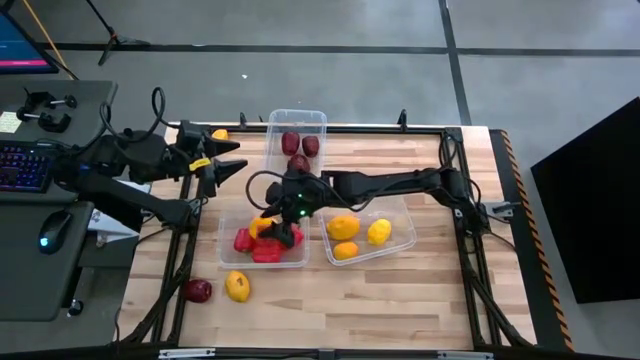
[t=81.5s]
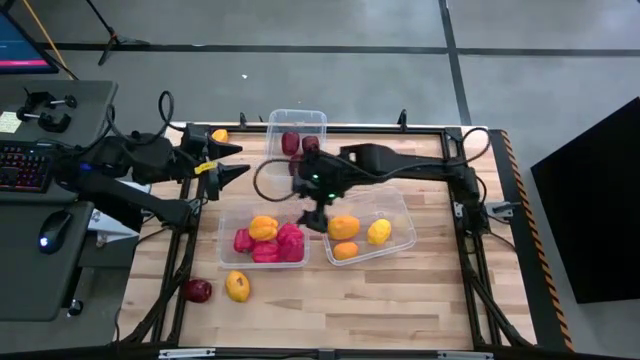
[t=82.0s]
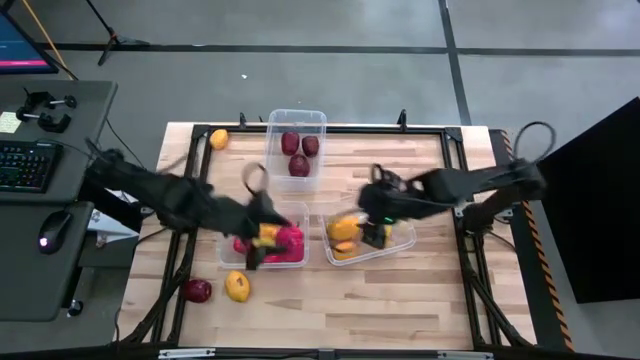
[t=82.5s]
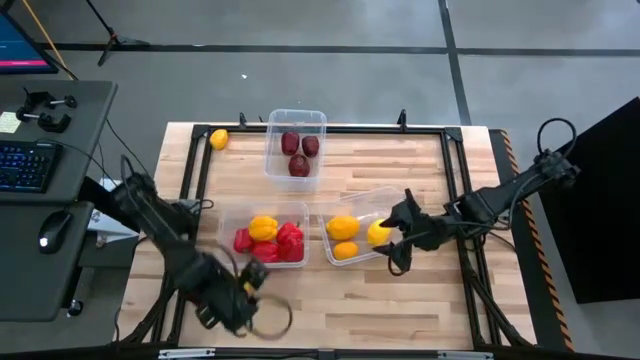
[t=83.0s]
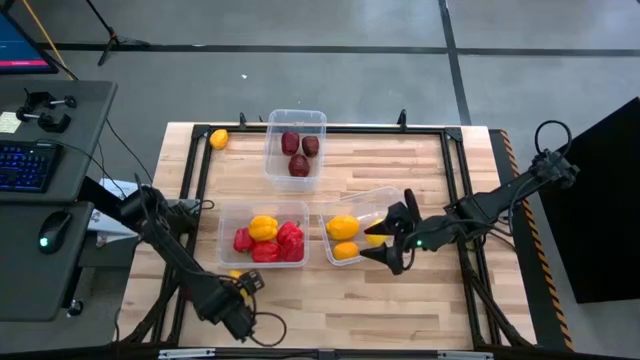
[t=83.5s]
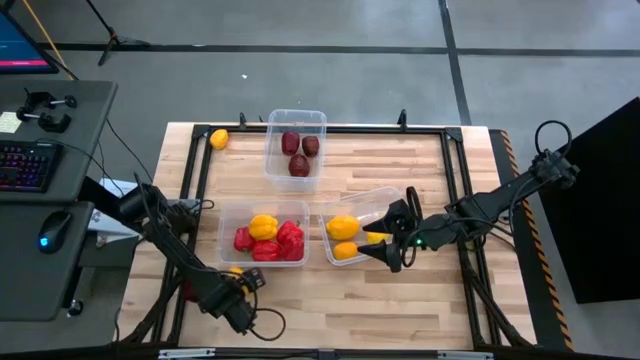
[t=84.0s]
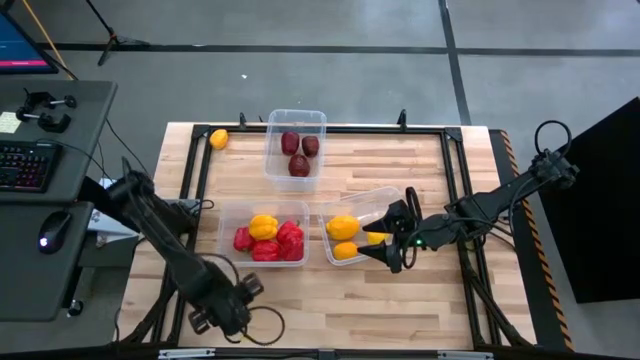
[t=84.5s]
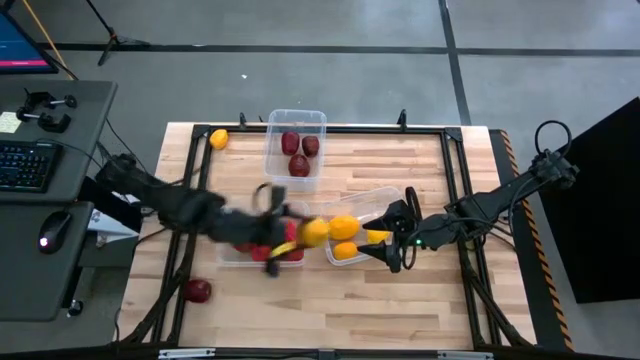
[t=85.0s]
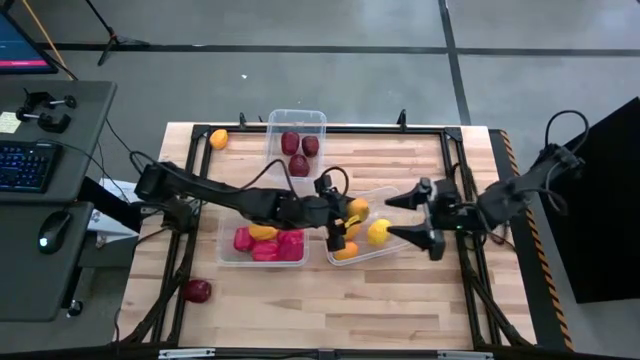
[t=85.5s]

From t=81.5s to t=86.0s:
Task: Sort produce into baskets
Put the bottom lemon into the middle right transparent bin

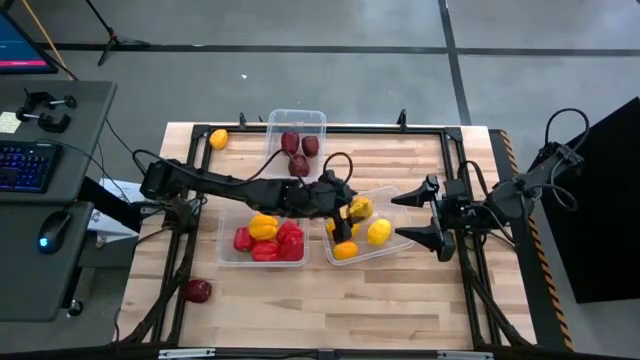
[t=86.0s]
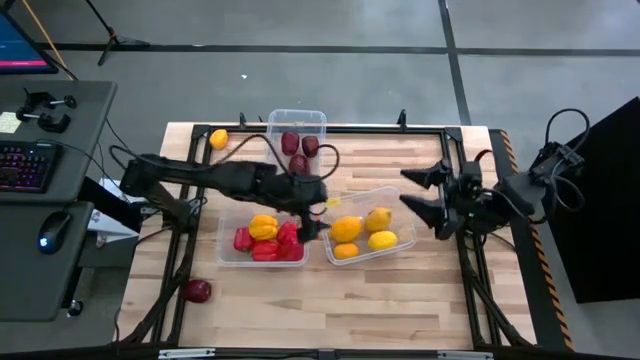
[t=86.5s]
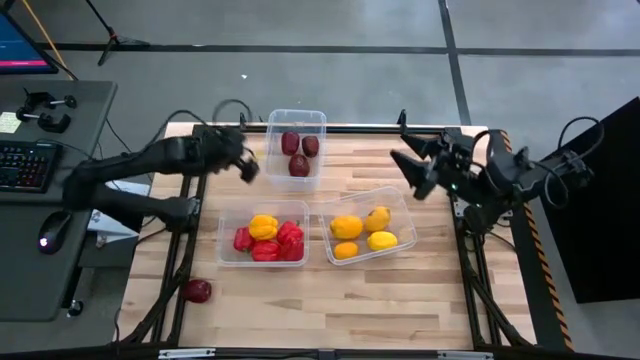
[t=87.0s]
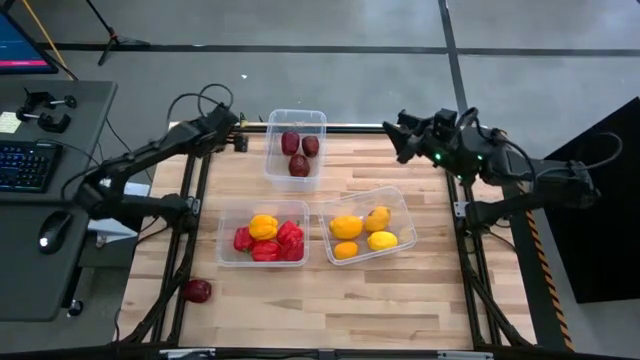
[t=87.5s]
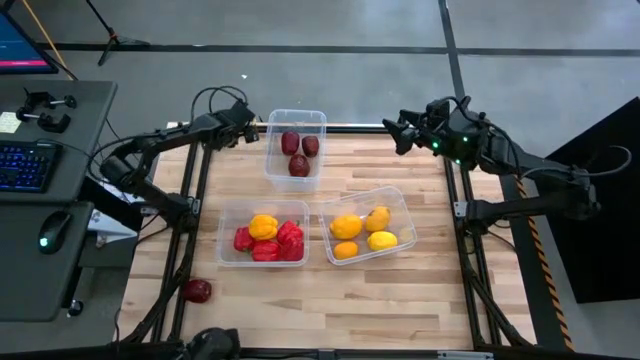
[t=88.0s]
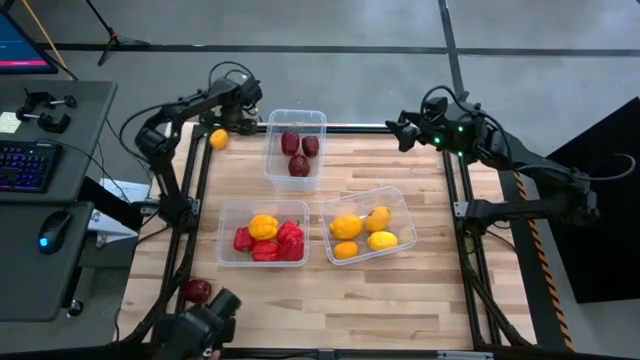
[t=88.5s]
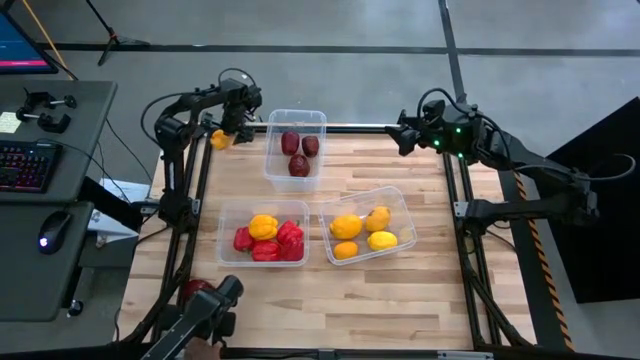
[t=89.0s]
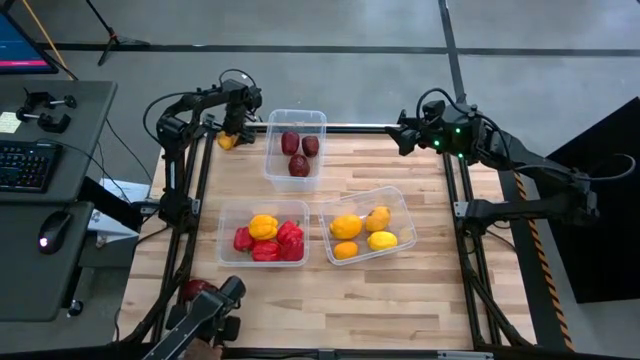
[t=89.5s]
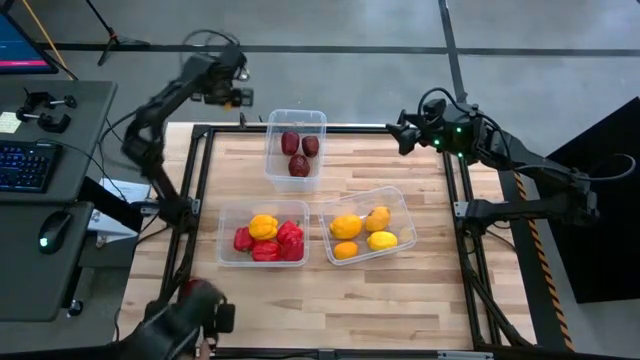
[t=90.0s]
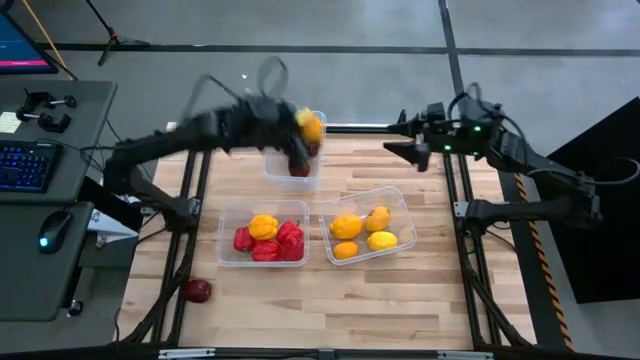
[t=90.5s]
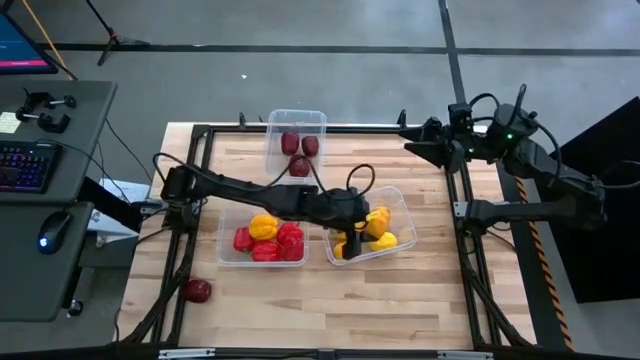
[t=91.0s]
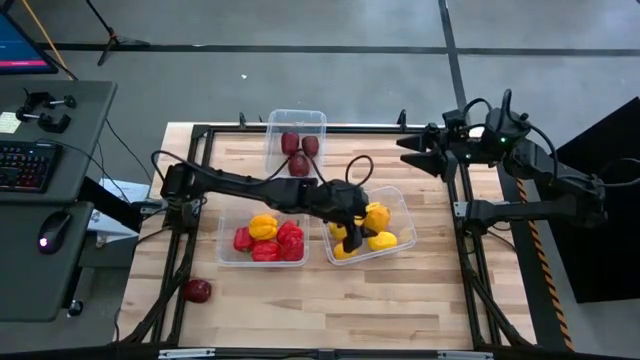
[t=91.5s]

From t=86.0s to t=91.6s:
Put the top left lemon into the middle right transparent bin

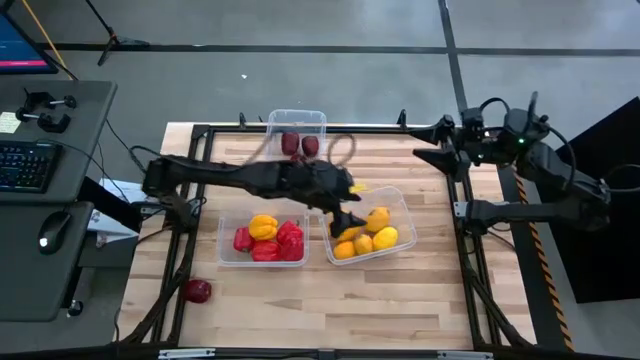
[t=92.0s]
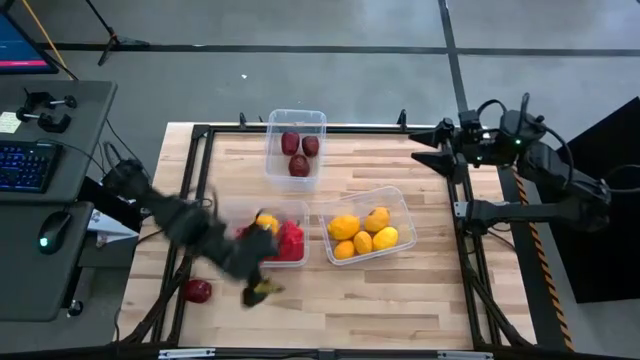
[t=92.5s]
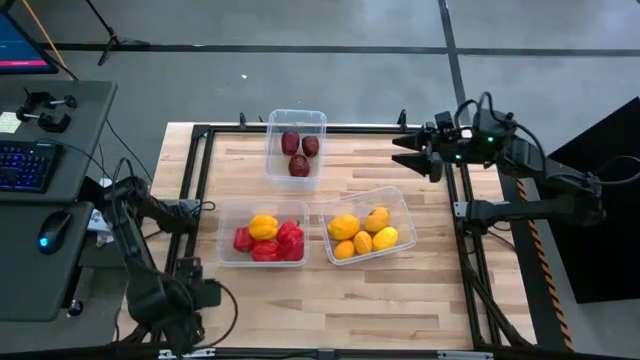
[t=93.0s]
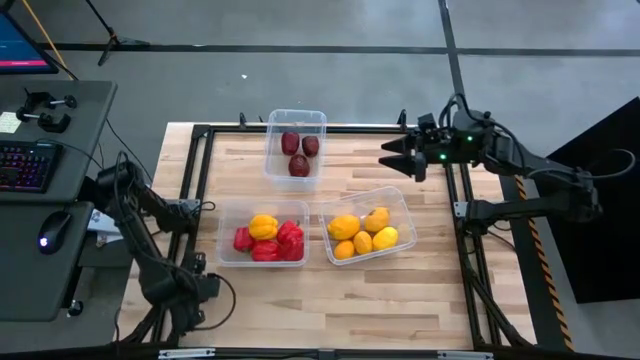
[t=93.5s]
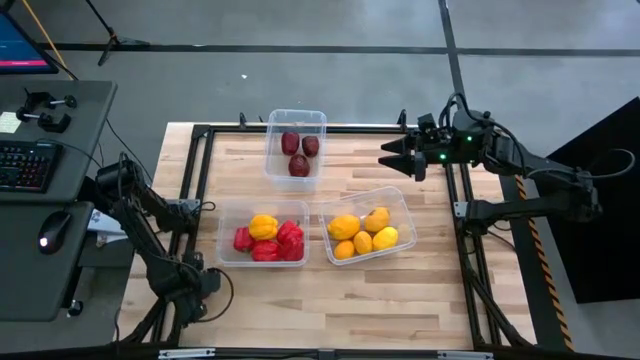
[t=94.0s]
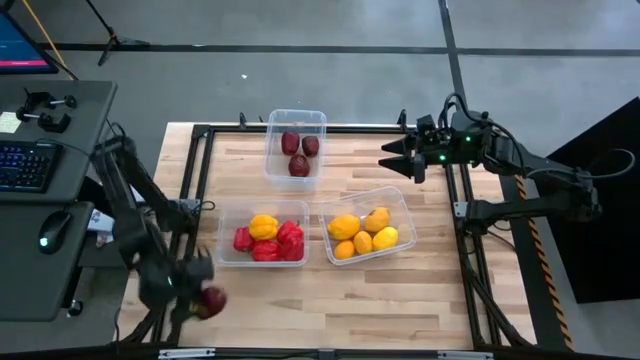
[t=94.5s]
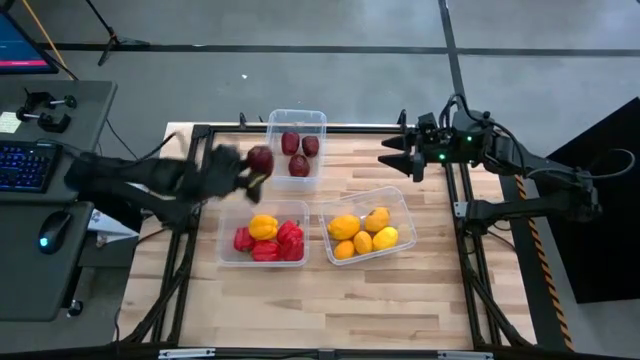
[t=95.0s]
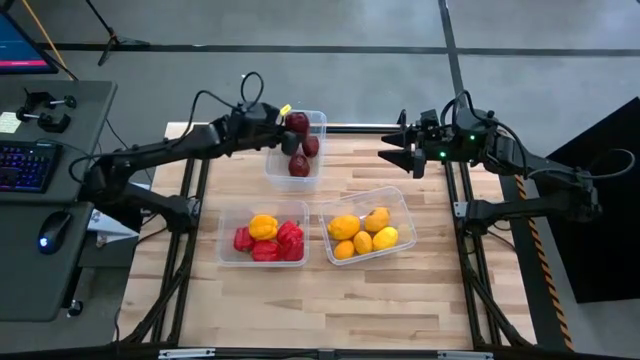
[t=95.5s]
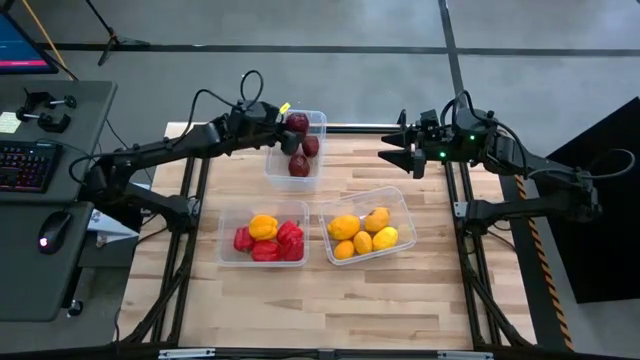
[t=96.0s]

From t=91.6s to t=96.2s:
Put the bottom left red apple into the top center transparent bin

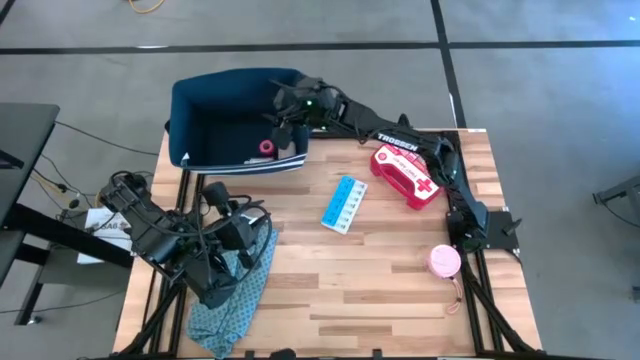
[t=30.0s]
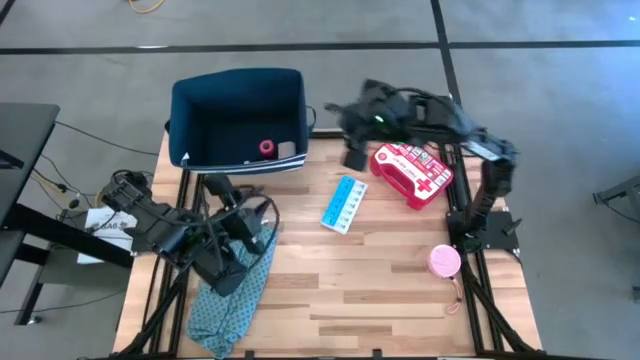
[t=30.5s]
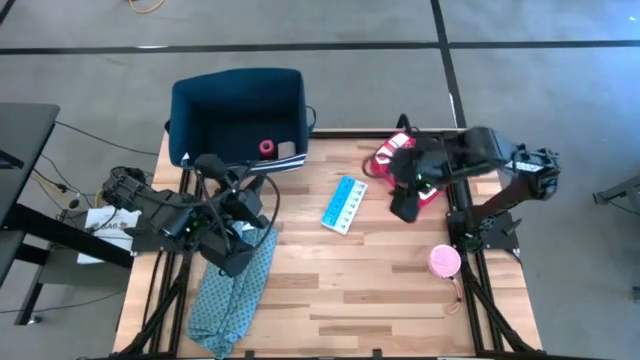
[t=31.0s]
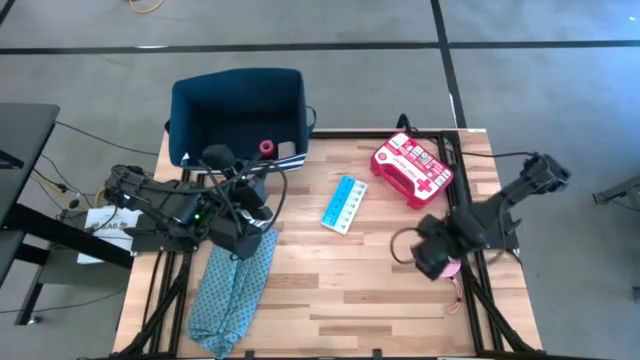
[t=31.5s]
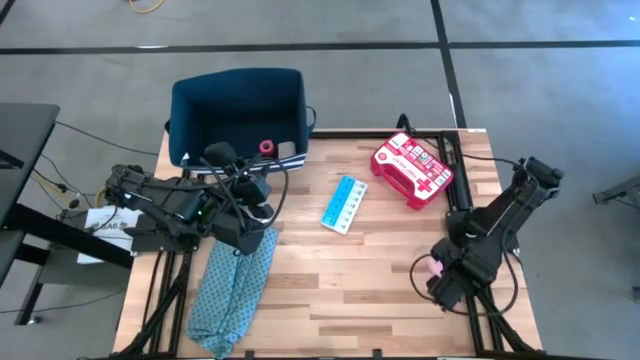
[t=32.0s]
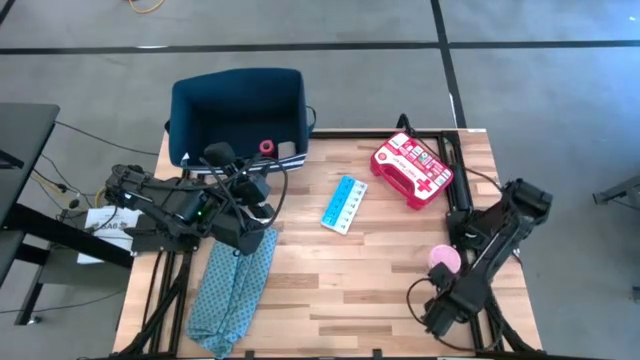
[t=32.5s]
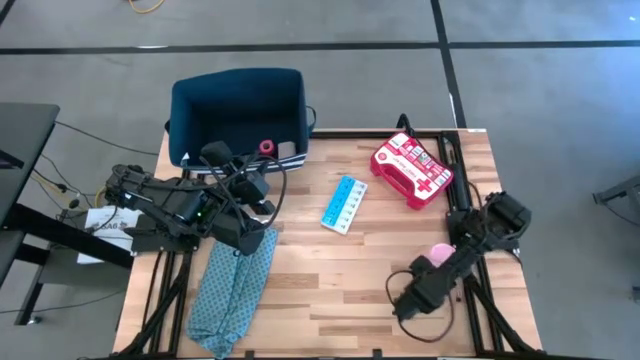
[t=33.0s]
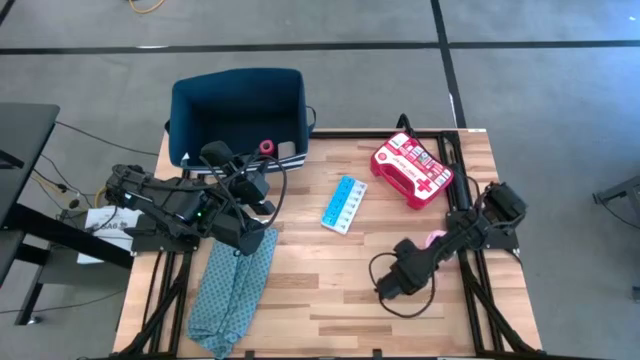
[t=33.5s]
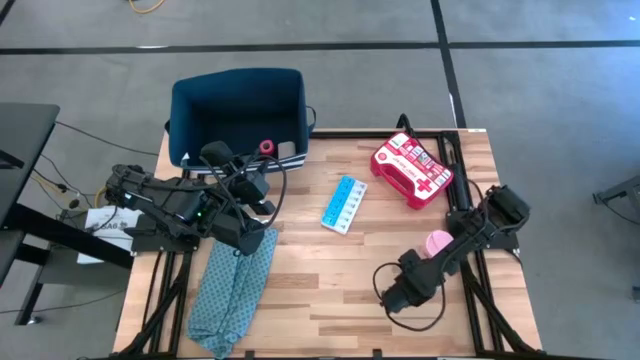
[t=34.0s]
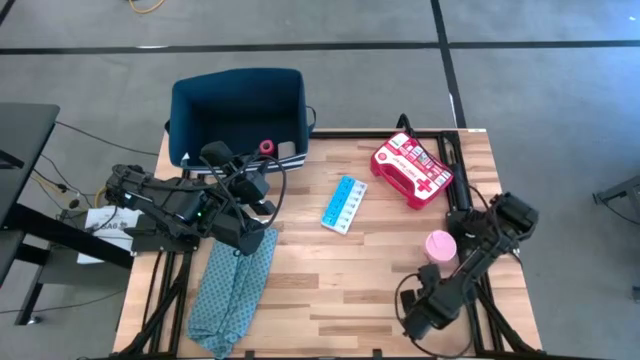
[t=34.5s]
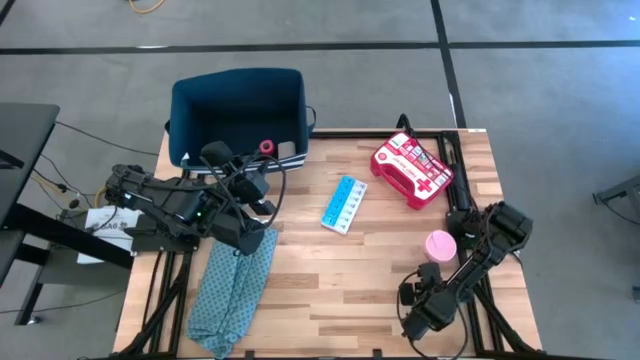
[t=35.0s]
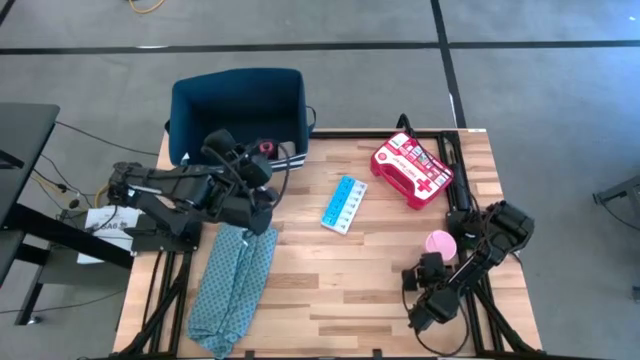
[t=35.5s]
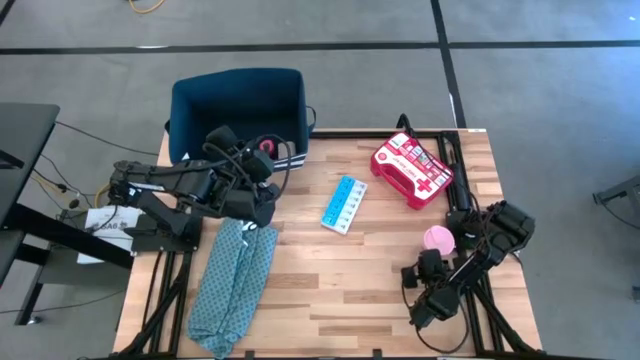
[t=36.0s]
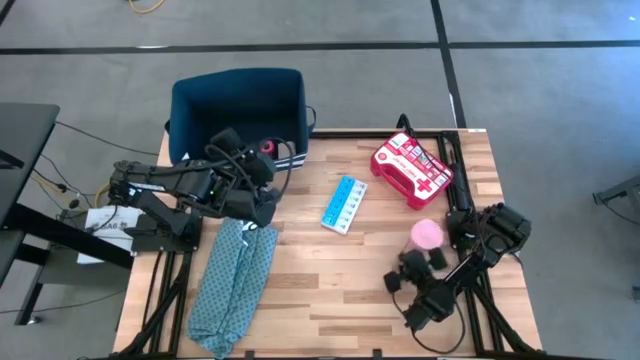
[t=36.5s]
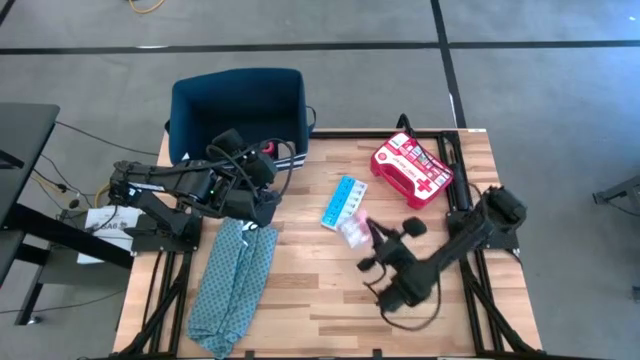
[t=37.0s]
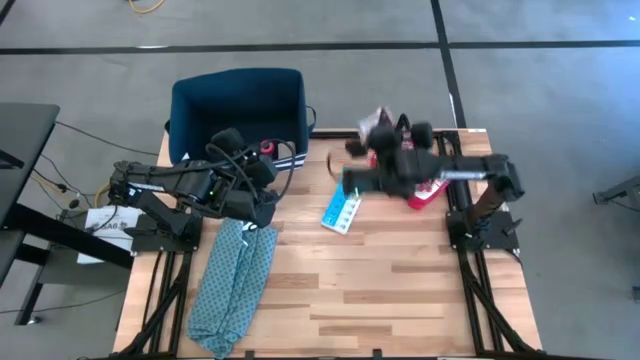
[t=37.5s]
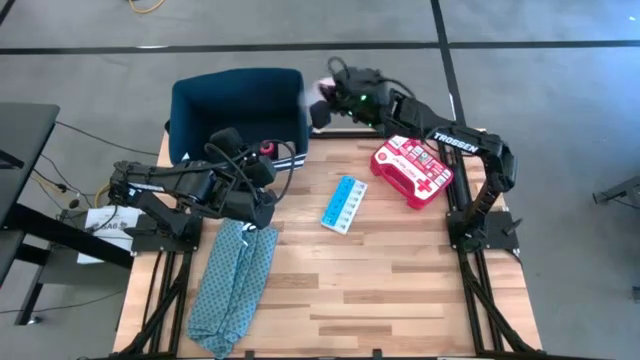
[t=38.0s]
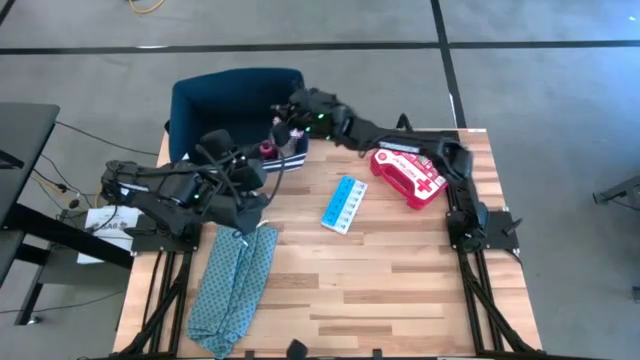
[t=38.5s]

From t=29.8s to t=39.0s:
Task: Pick & place medical supplies in basket/bin
Put the pink tumbler into the blue bin
